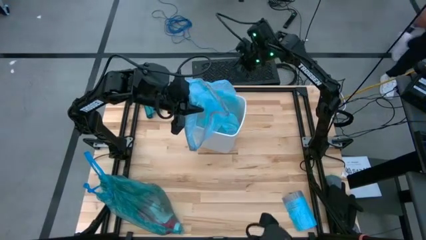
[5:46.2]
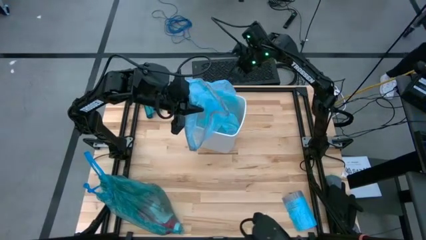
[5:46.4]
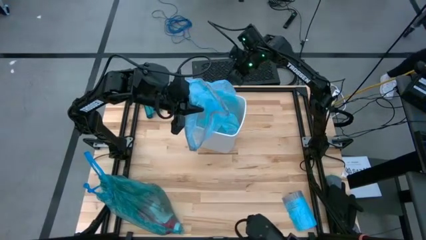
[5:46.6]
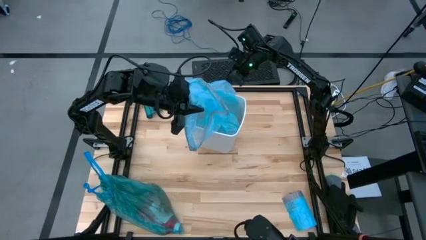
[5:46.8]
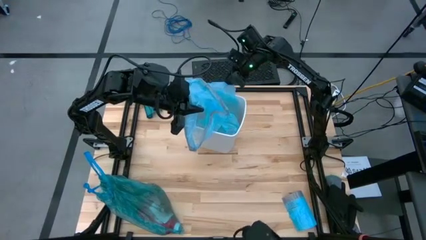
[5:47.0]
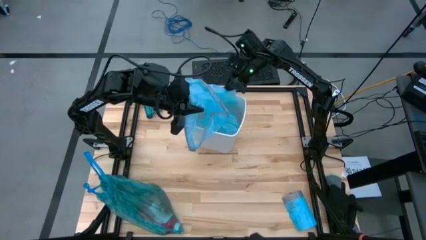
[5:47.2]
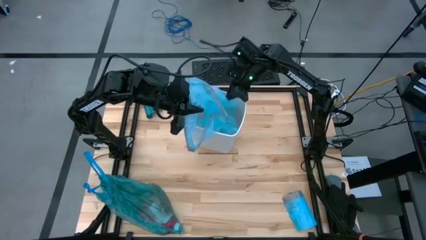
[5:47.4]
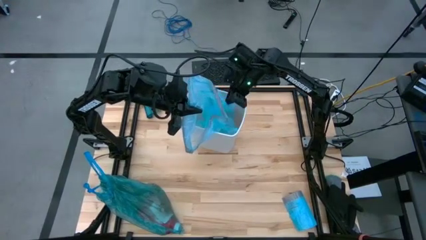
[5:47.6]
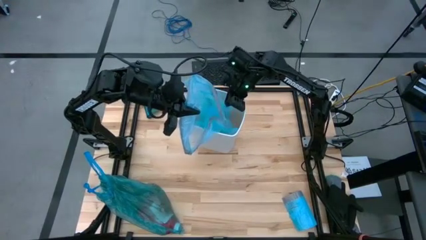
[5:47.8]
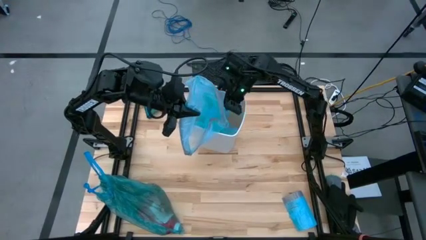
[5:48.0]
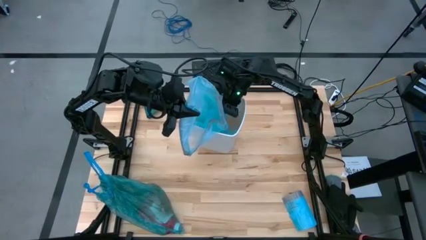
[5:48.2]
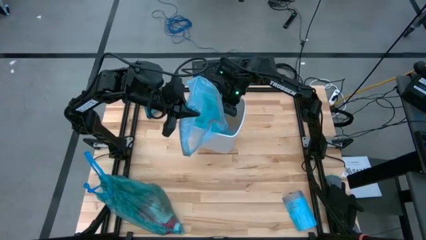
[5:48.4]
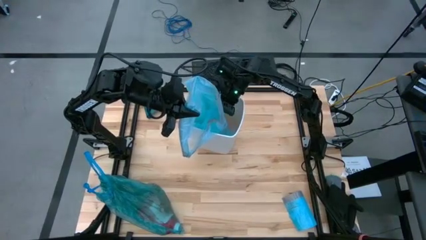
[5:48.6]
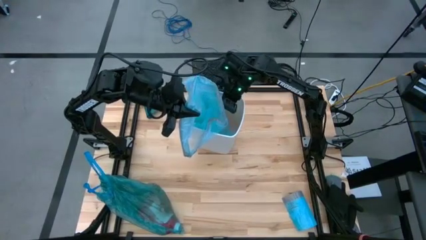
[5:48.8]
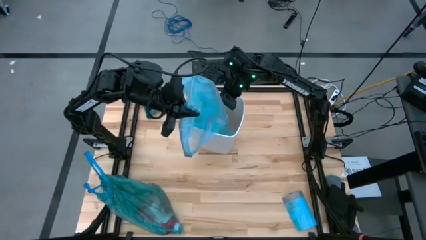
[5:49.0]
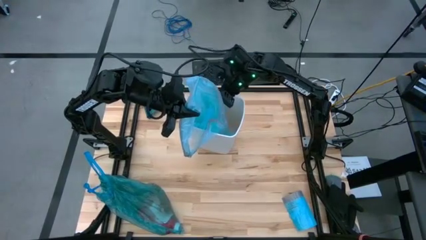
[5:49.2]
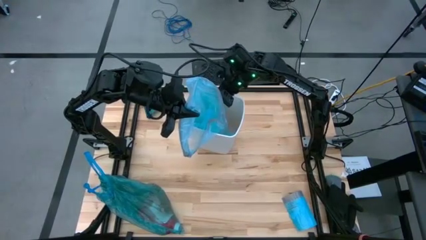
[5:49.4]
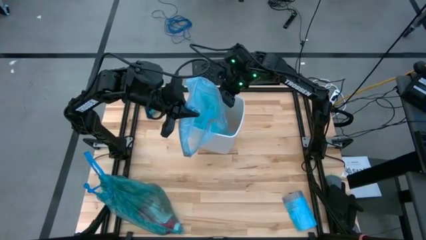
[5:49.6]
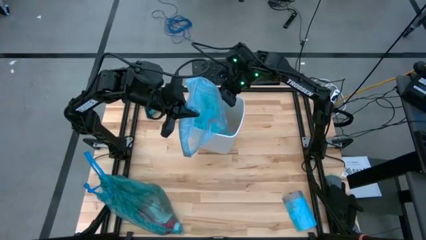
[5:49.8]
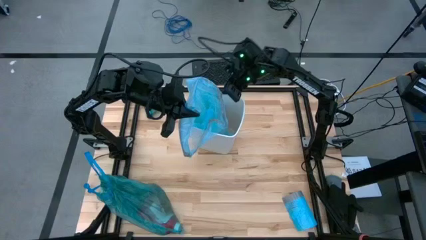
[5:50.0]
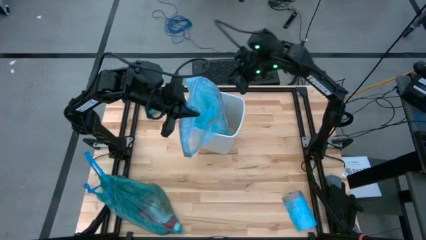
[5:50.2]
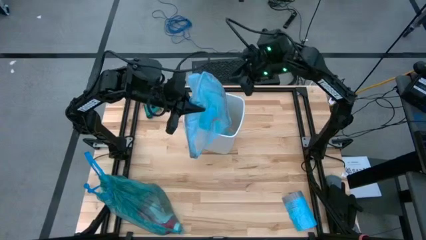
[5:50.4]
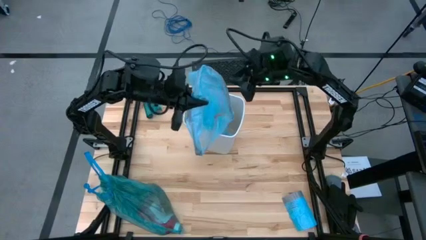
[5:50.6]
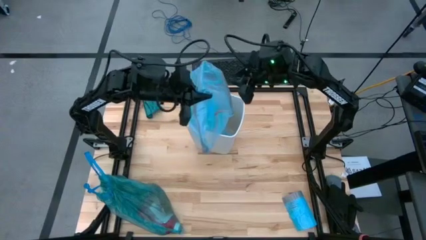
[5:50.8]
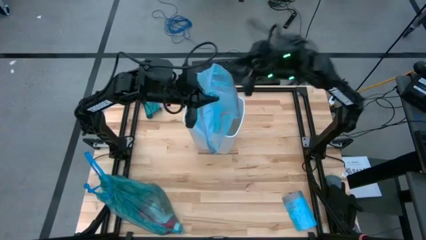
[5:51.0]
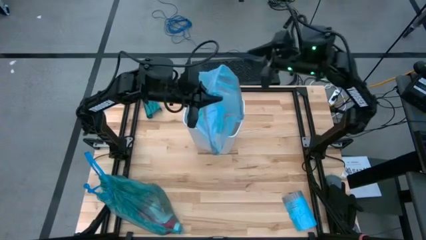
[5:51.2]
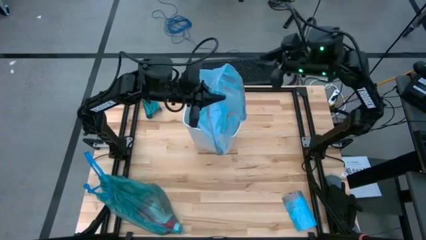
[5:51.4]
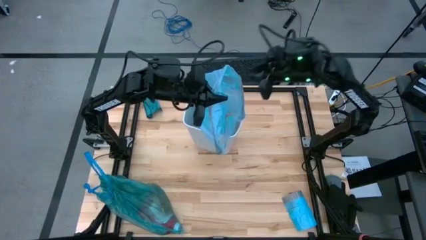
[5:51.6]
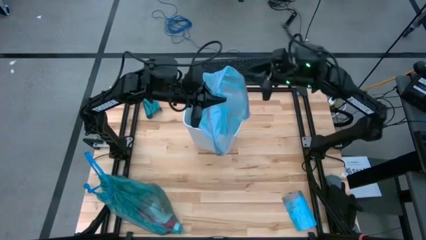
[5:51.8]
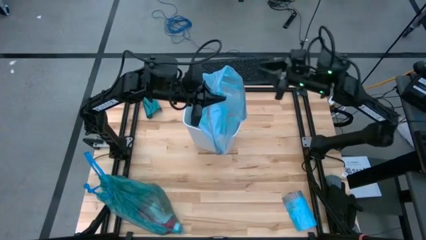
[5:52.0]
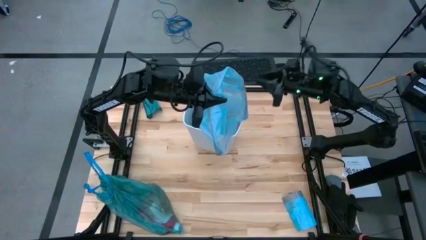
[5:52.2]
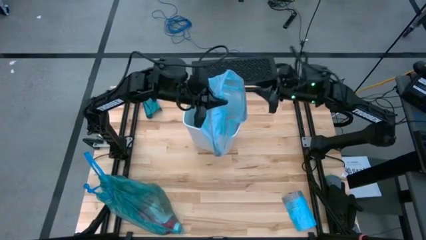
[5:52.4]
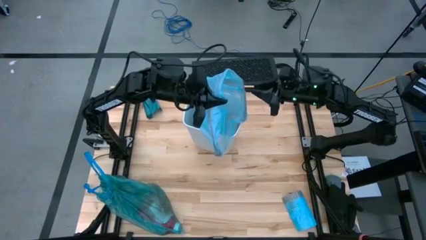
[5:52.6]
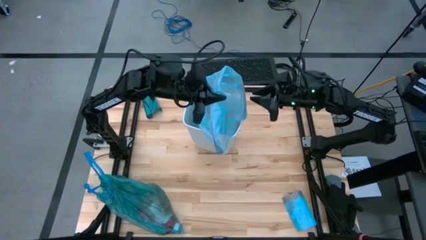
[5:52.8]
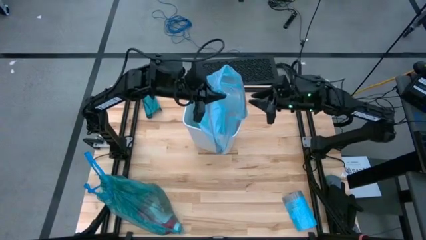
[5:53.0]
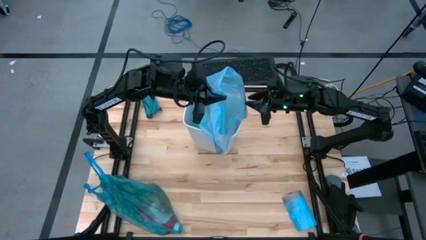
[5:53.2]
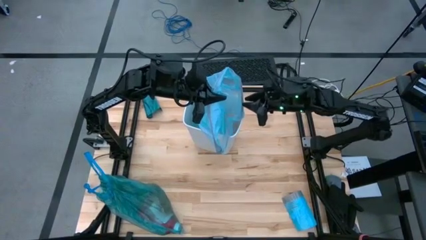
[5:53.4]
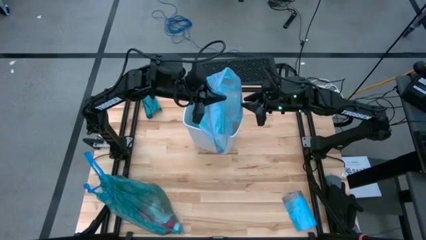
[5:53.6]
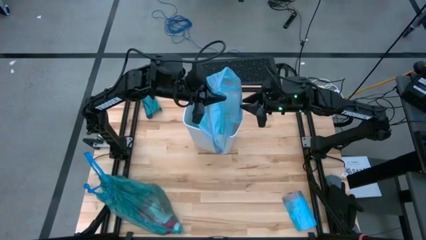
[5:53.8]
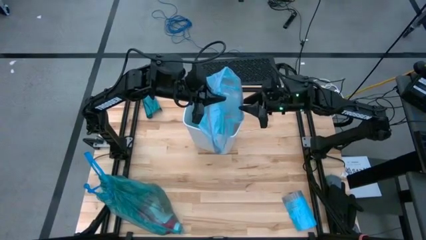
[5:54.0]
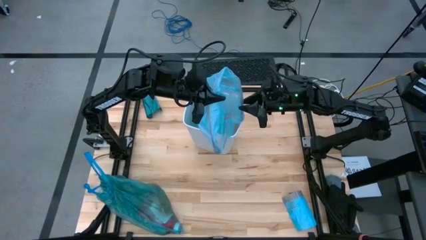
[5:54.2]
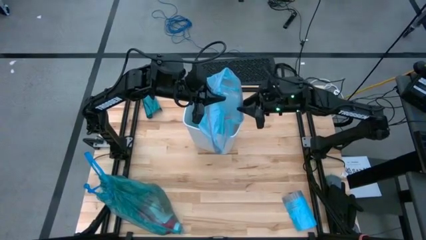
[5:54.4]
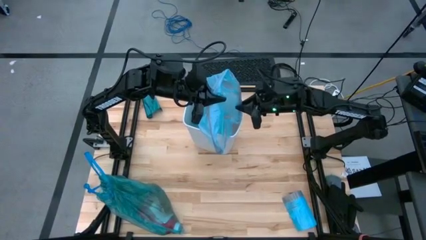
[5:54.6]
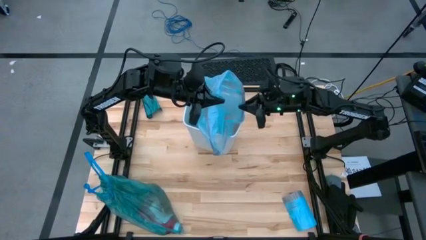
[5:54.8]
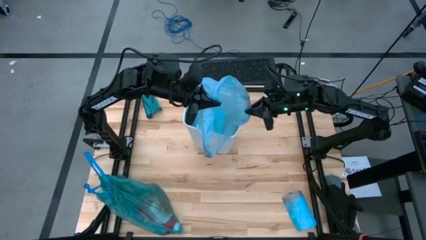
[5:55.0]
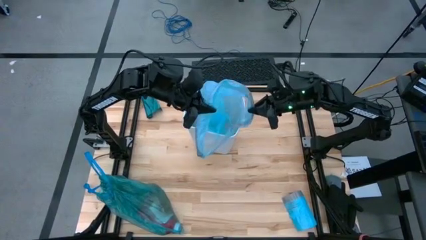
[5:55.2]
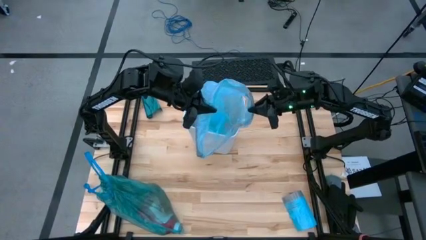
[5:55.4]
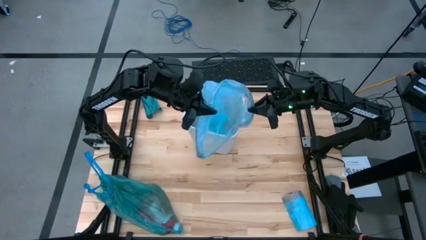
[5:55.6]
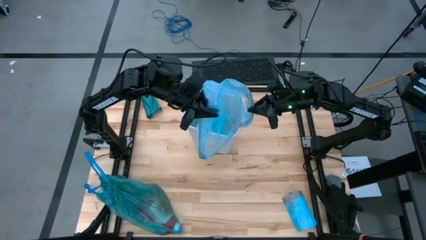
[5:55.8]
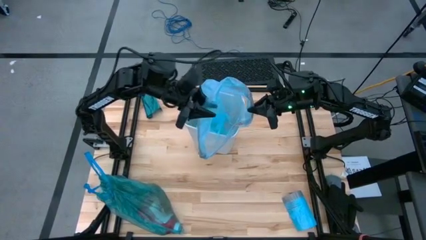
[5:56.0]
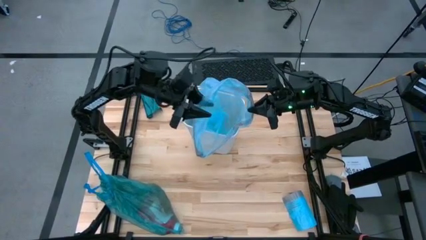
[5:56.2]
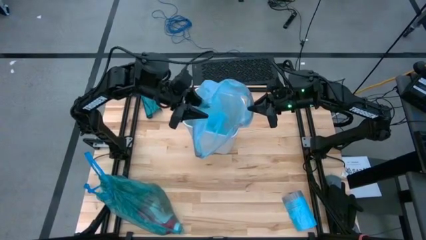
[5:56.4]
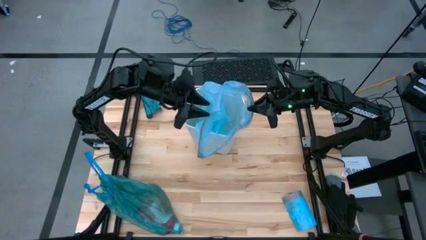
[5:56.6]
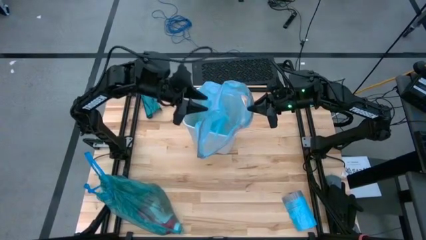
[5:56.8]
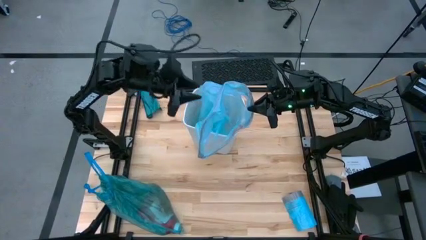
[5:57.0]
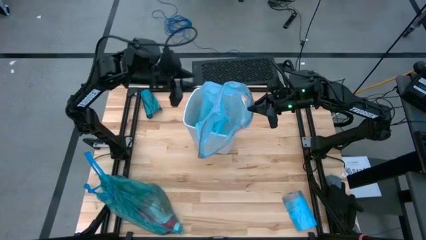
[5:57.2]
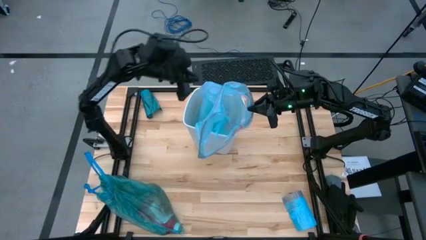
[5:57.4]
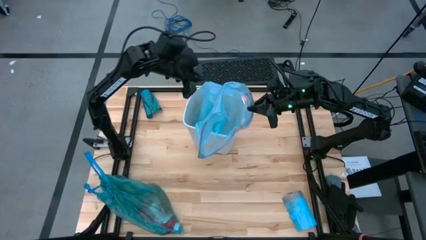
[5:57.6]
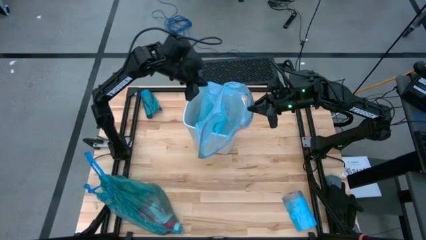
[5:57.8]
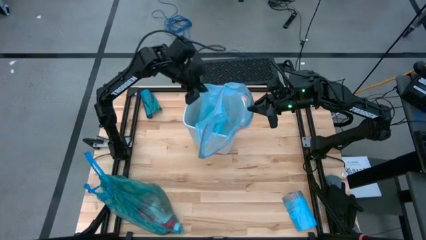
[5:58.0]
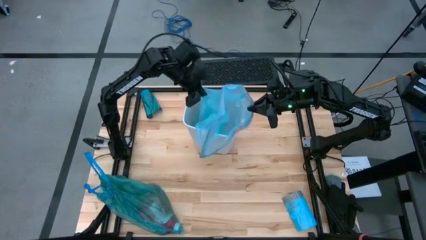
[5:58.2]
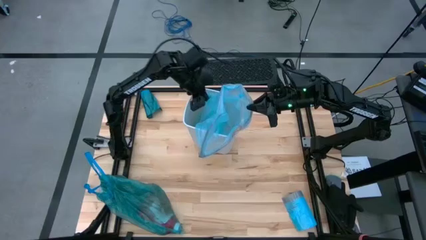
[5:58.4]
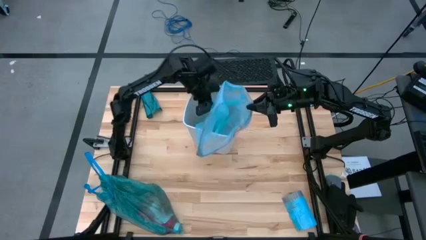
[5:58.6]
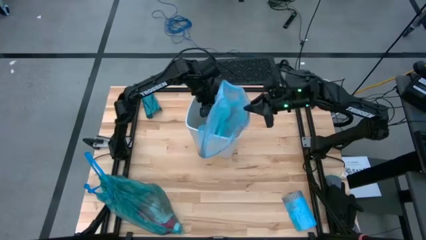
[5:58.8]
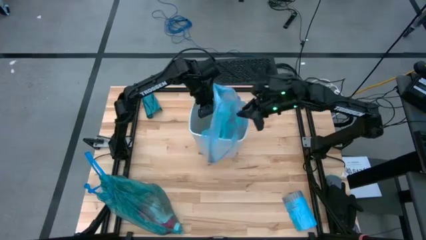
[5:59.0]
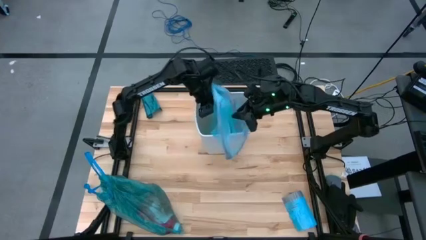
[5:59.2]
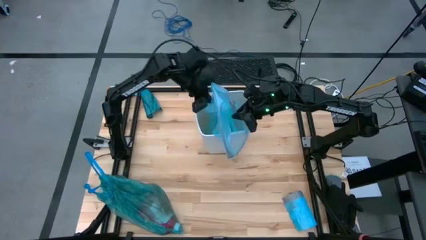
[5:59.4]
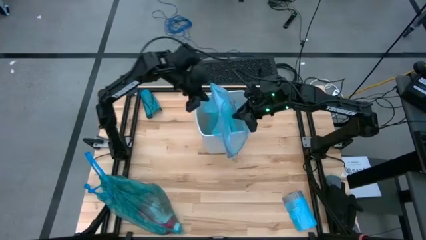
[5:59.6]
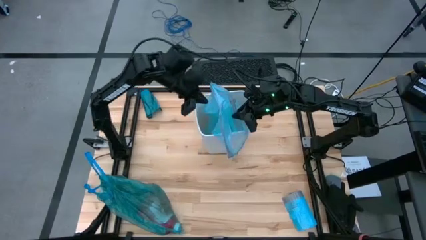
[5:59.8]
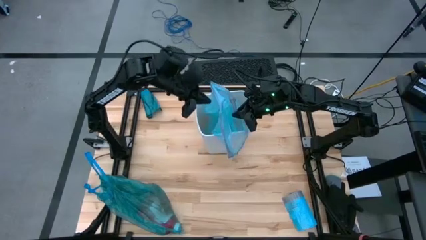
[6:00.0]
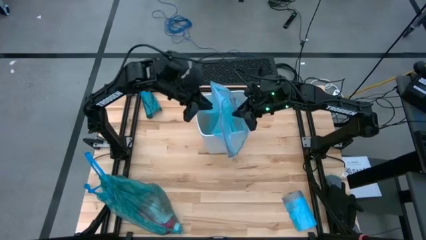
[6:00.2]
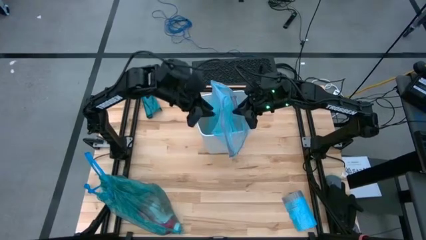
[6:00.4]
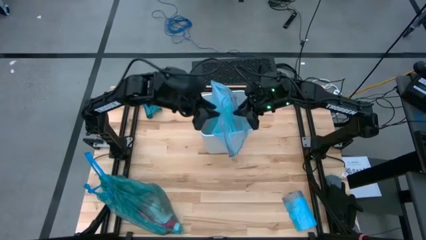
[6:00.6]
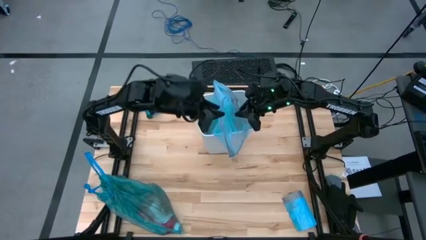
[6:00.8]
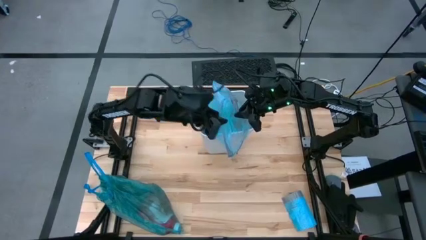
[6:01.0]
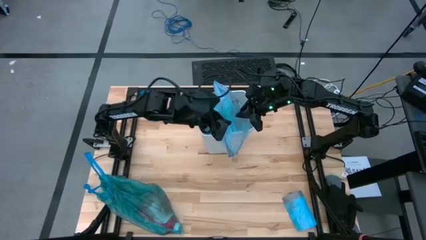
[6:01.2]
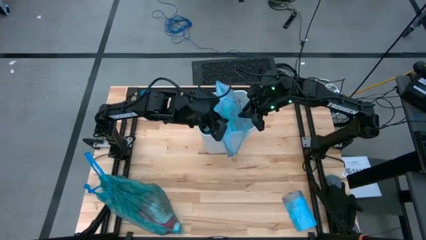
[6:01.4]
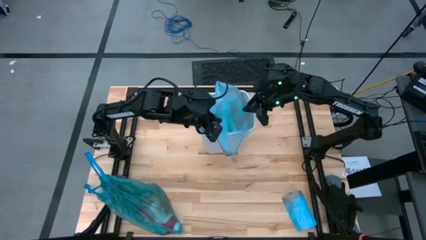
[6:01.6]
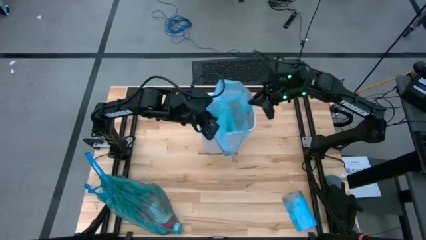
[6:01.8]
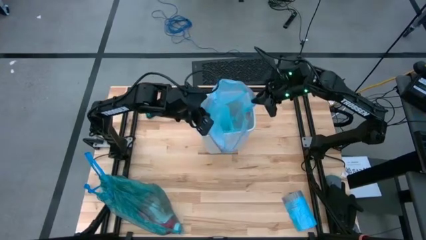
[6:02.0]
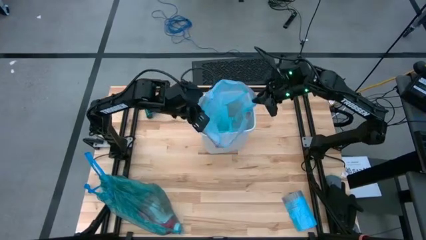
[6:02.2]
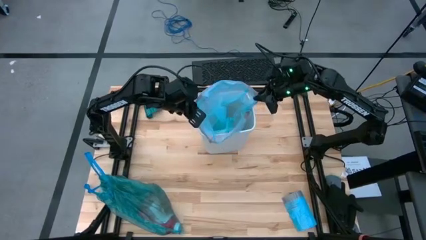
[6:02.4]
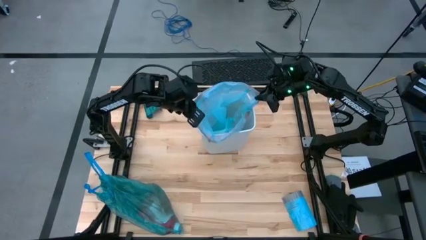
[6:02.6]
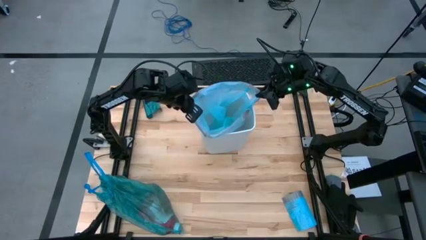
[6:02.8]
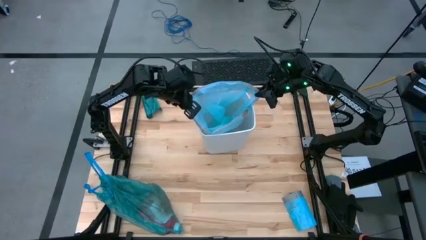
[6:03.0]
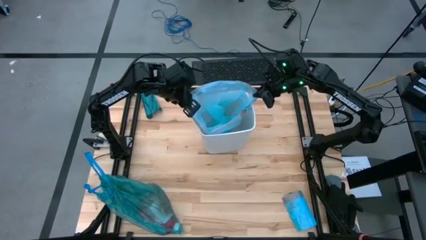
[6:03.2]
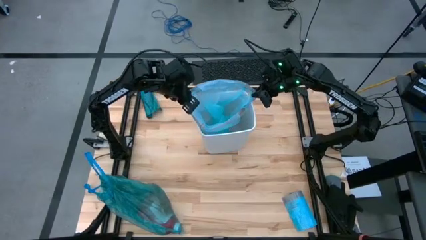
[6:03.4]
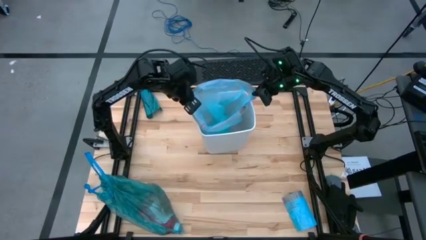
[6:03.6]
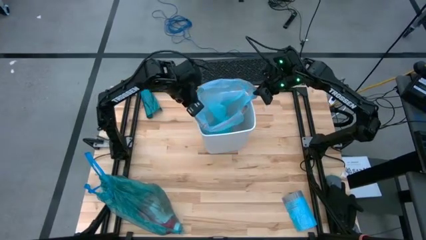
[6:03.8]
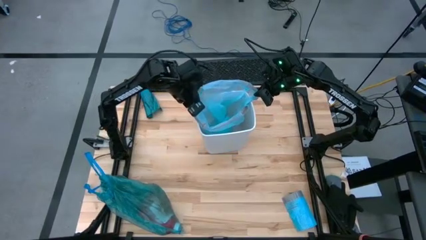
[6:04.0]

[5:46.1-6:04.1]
Task: place trash/remove bag and relplace
Insert the new blue trash bag into the white trash bin
